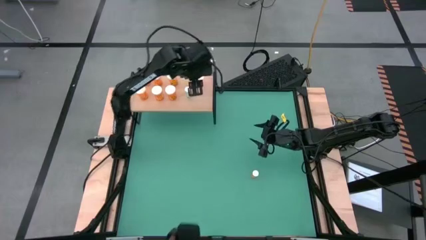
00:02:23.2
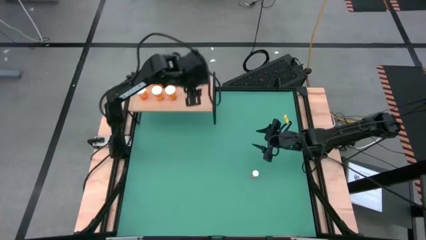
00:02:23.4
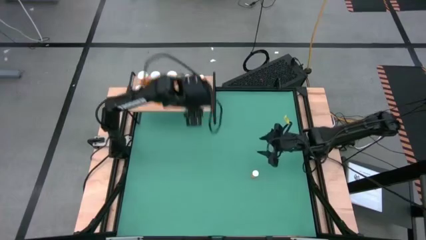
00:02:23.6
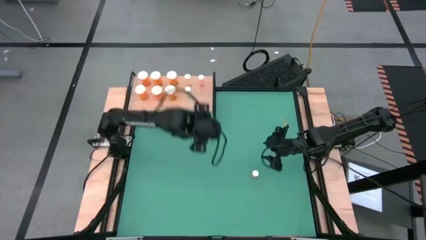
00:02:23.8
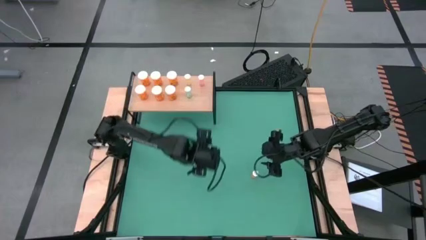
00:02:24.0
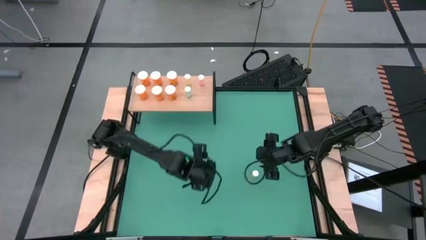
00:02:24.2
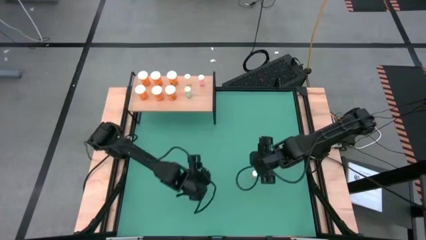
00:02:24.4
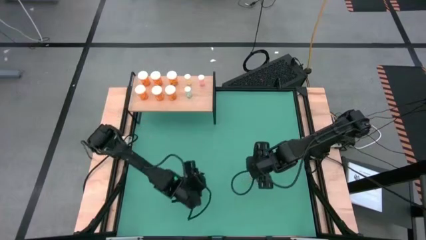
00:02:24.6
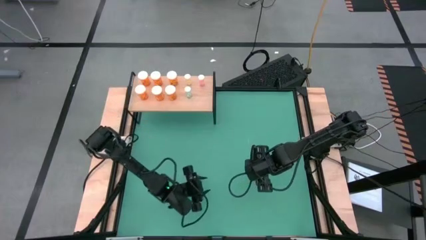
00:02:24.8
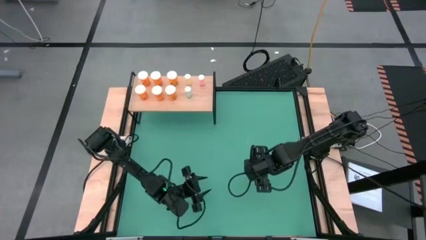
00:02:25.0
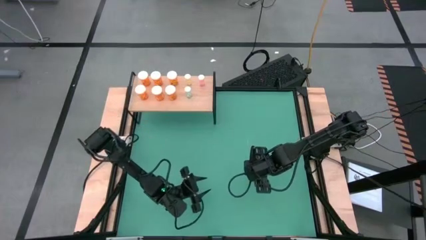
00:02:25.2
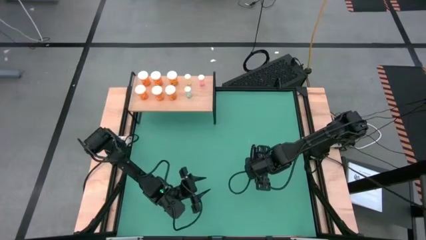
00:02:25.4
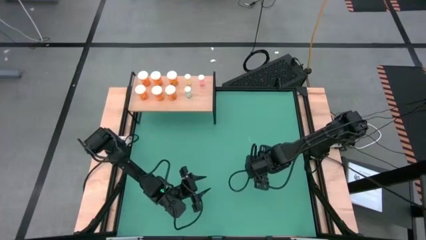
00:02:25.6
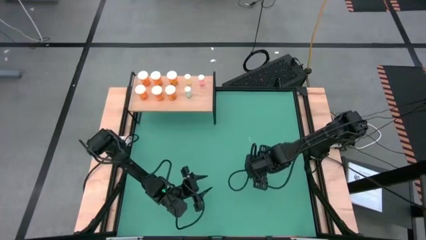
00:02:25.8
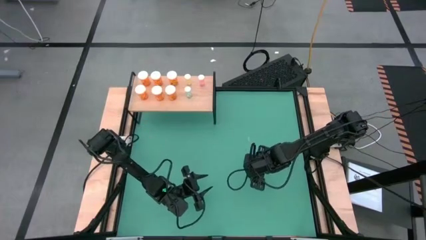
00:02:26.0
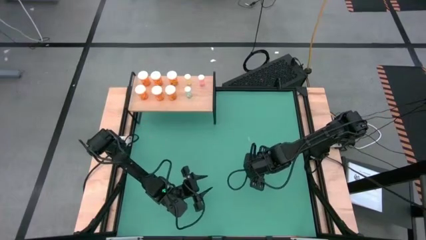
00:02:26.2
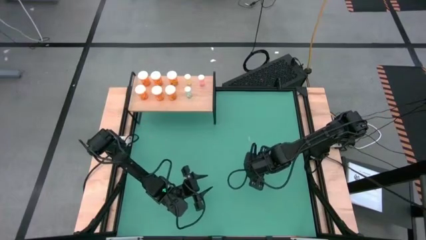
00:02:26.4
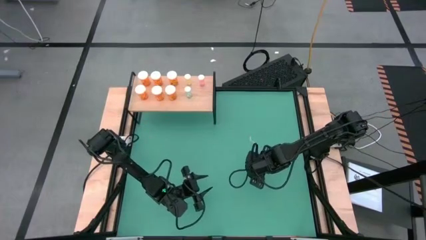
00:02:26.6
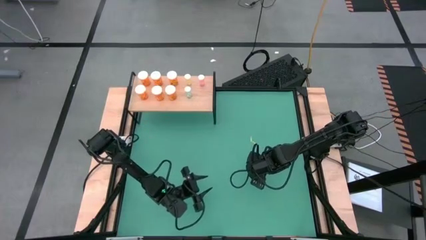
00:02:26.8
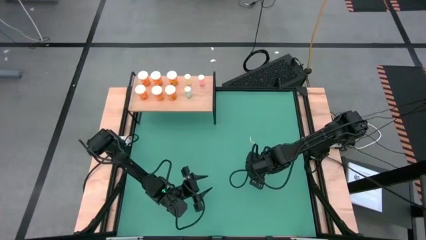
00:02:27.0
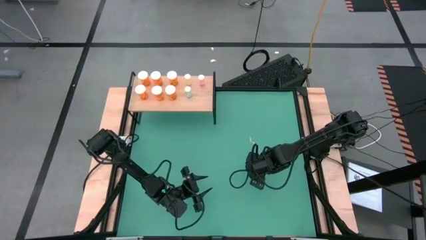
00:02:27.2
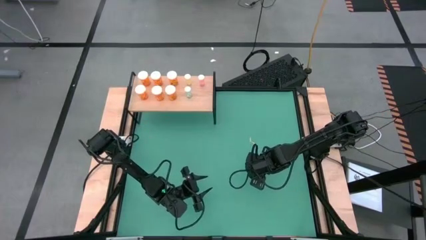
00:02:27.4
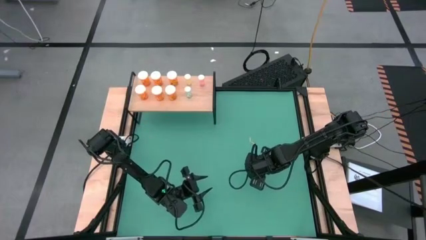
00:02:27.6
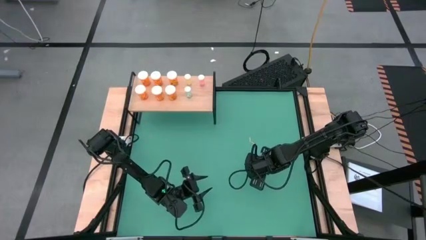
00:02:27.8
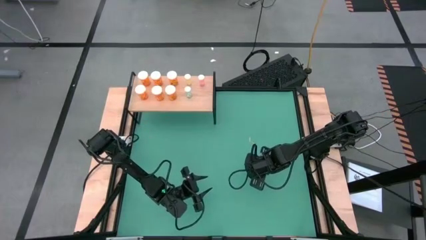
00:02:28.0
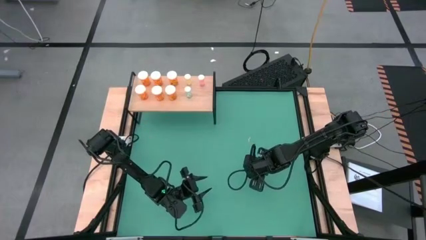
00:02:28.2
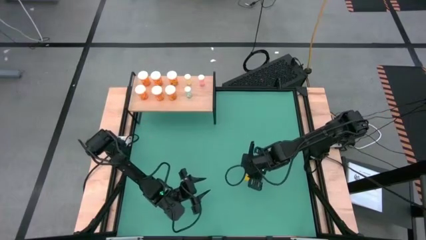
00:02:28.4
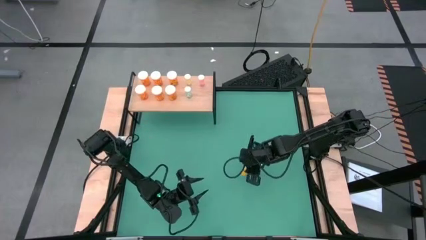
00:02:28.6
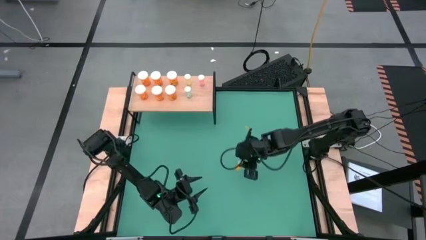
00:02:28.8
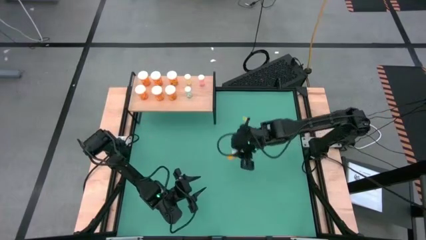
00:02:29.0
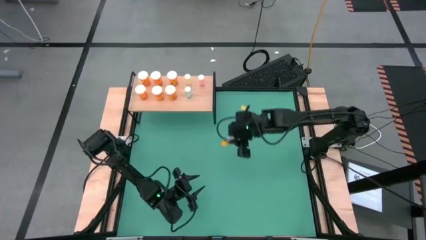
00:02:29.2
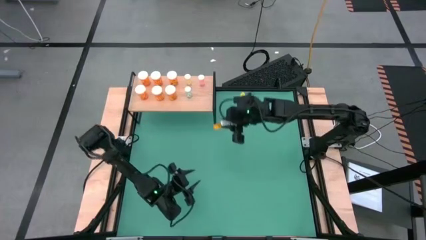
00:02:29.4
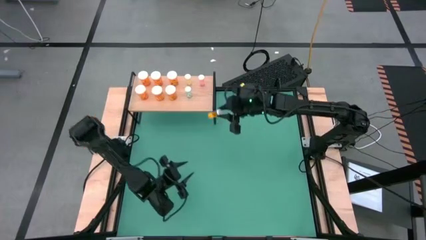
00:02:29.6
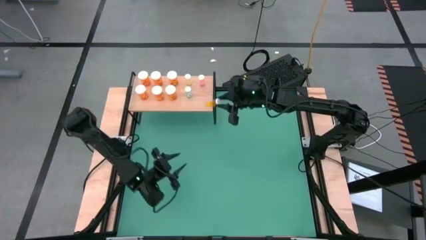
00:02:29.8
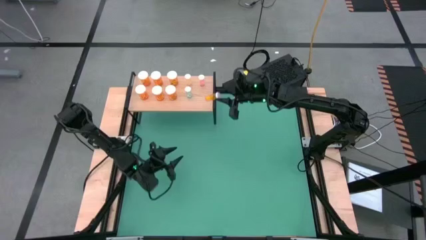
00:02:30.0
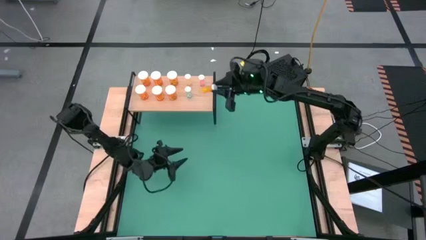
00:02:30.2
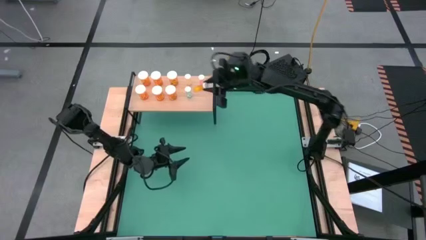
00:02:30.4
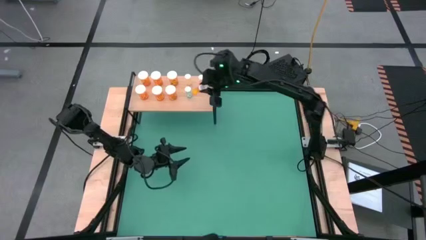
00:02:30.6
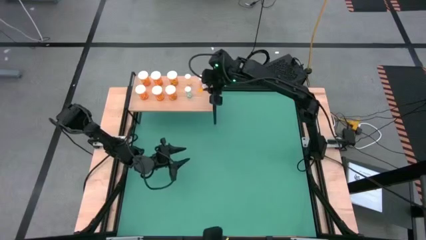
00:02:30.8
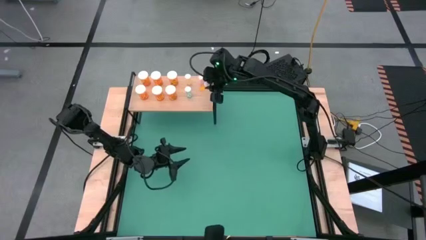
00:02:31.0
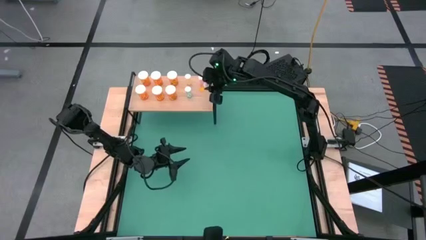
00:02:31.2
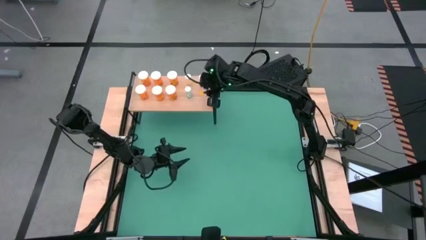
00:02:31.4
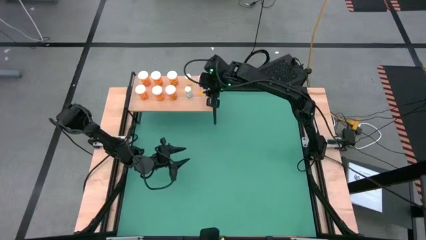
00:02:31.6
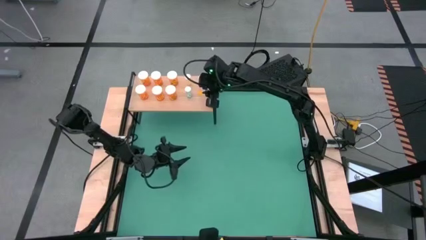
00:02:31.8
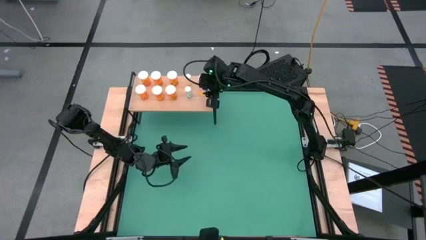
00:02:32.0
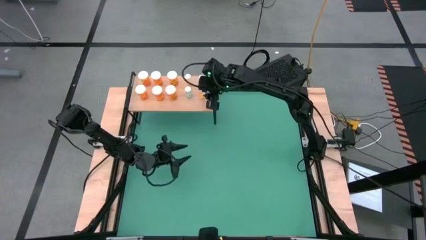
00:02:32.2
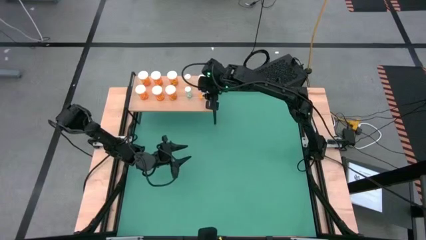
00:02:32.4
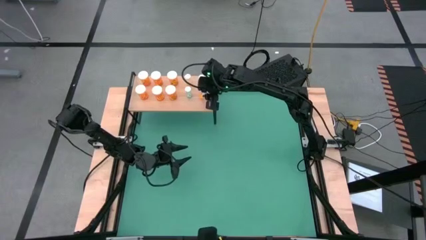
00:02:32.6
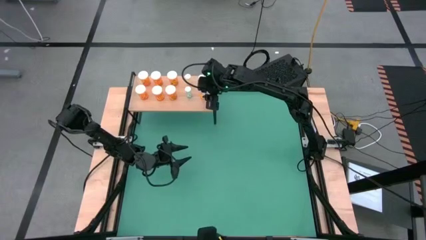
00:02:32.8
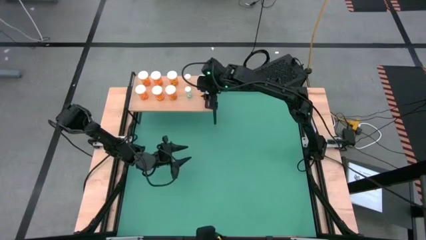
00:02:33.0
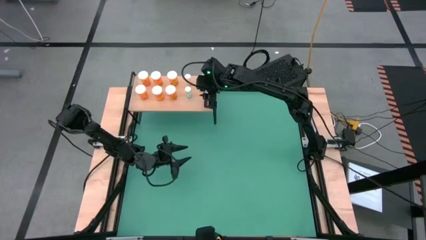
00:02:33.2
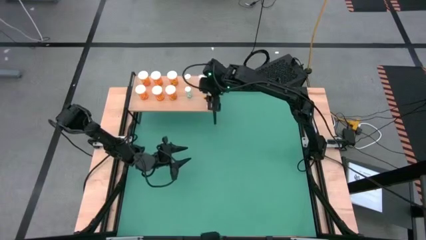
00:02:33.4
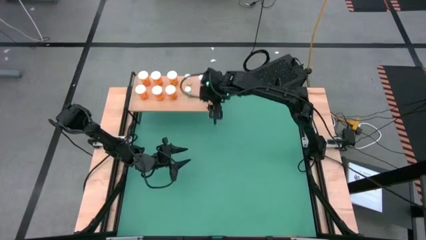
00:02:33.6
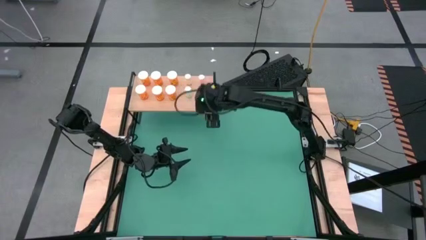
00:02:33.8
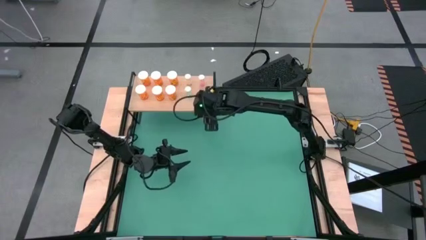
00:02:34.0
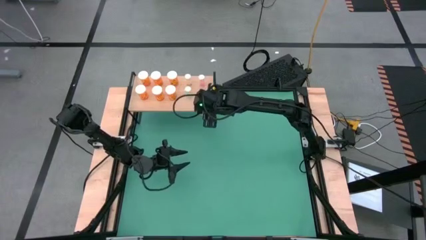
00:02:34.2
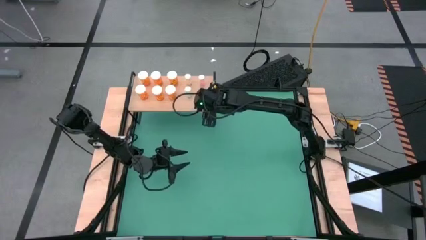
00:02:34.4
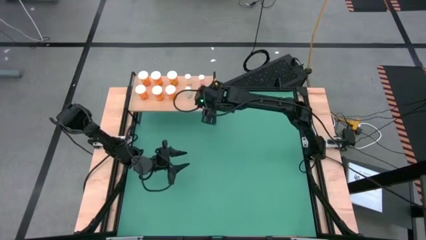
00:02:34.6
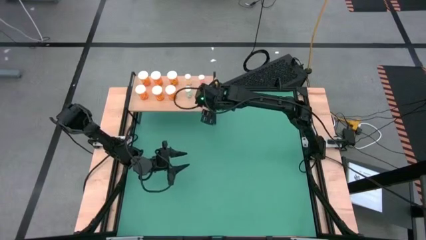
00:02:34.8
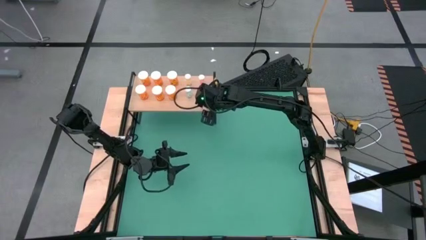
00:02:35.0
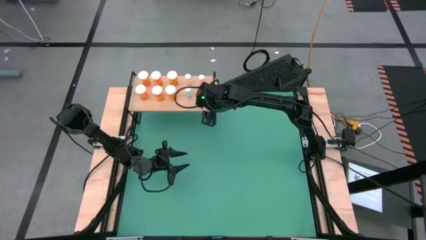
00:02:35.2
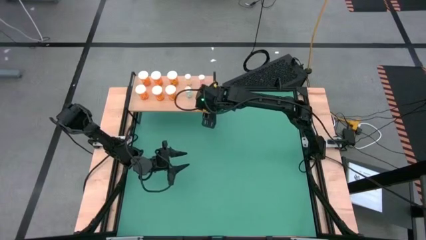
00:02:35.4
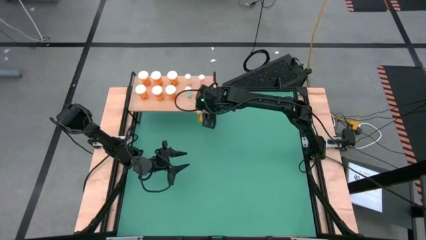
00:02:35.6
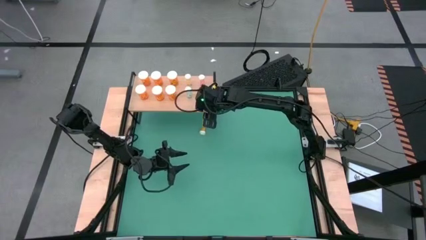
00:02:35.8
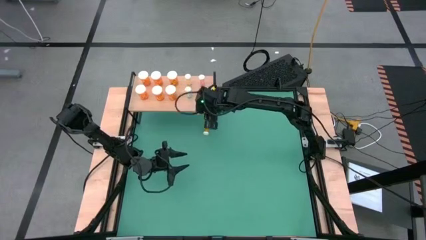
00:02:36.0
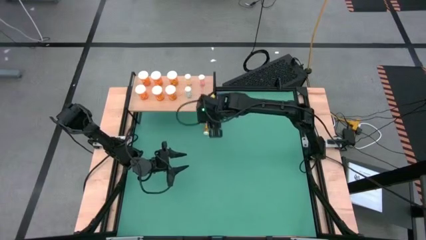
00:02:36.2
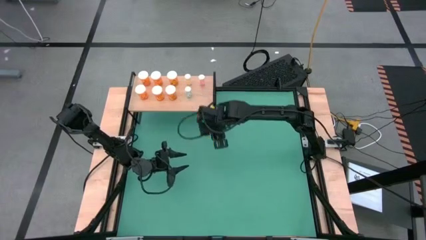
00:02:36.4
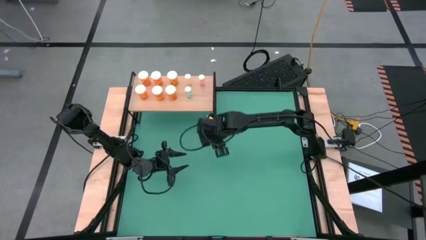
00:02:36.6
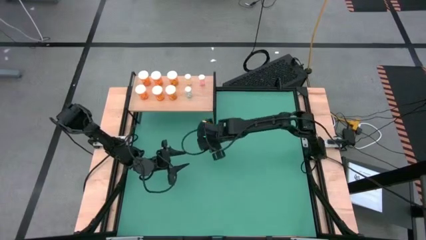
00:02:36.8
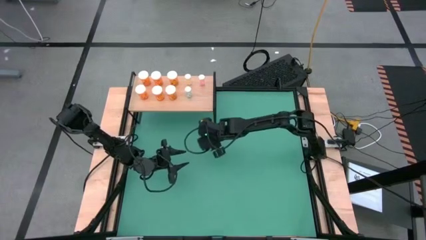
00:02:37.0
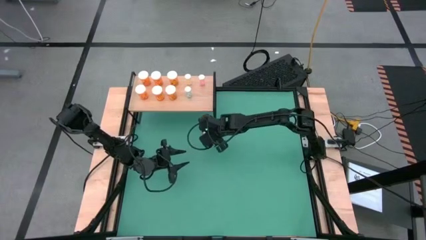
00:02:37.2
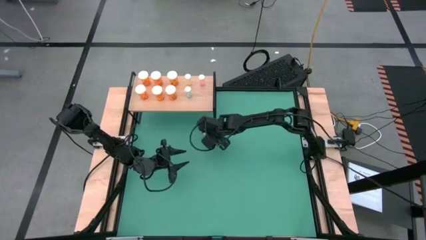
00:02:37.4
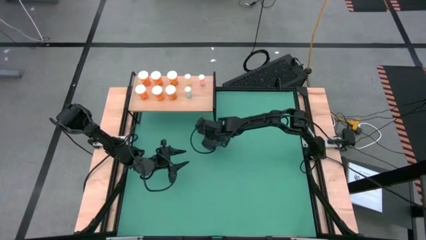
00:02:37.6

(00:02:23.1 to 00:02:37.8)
Task: Pick and place medicine bottles onto shelf by color
Put the small orange pill bottle on the shelf aligned with the other small orange pill bottle
